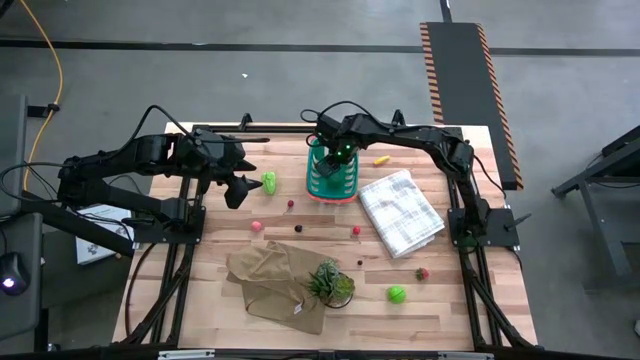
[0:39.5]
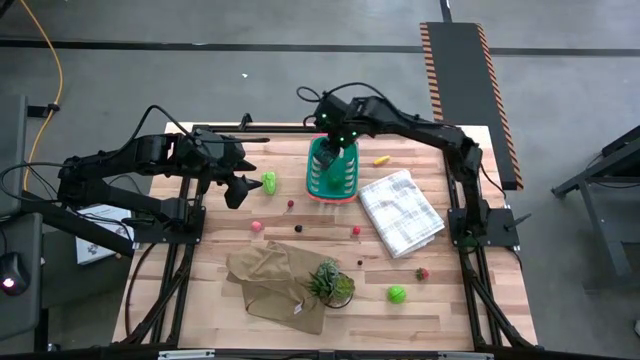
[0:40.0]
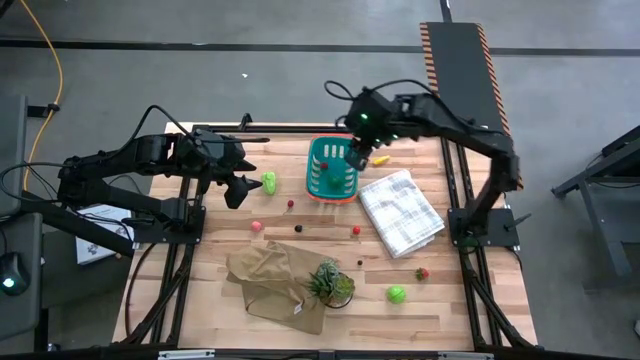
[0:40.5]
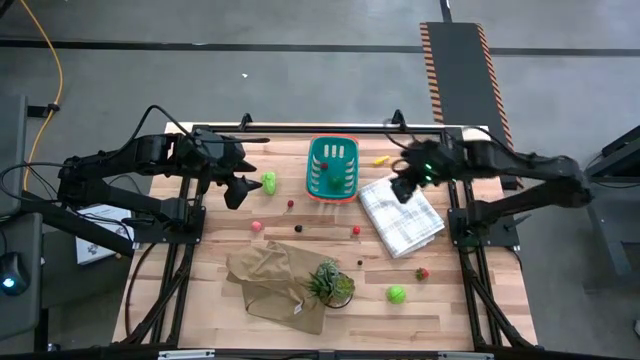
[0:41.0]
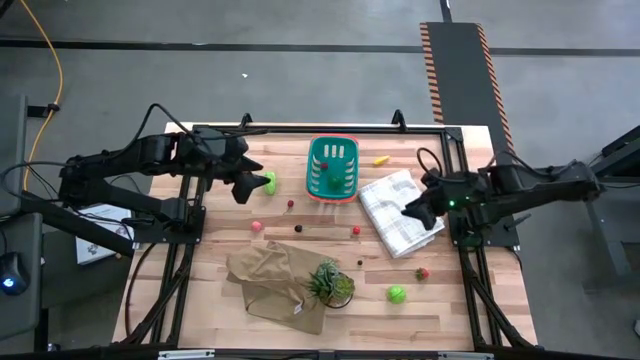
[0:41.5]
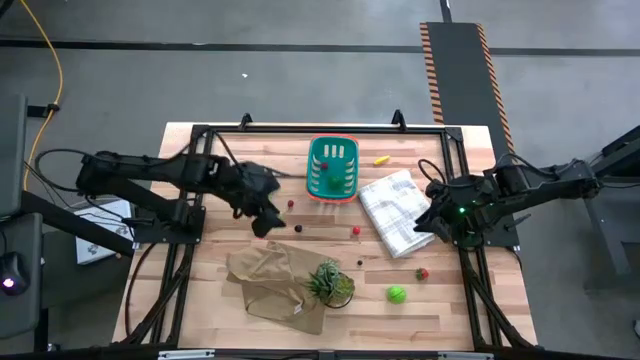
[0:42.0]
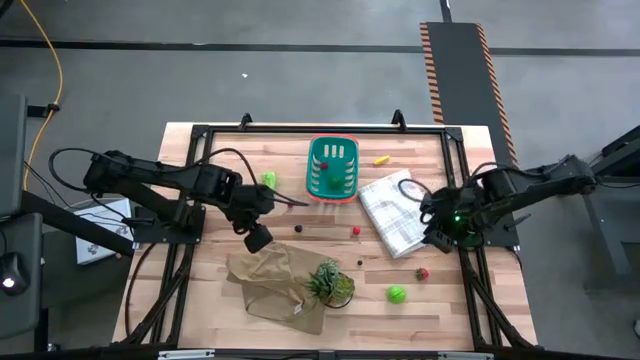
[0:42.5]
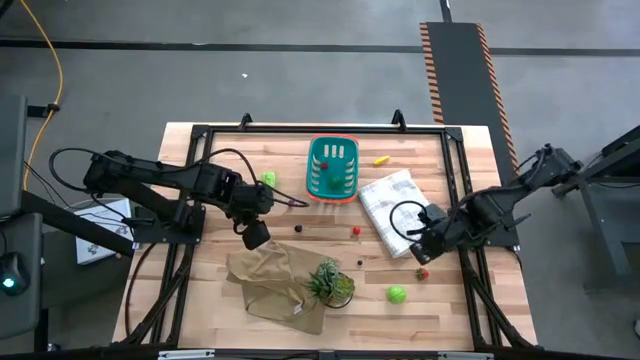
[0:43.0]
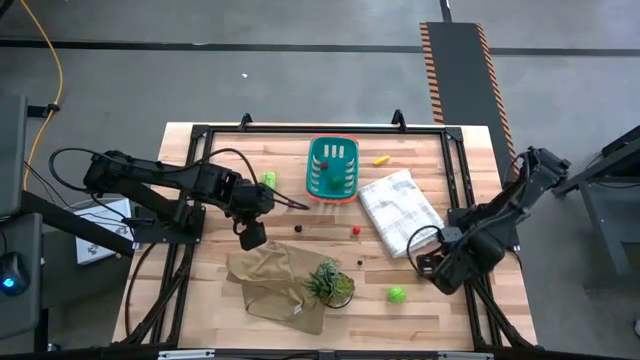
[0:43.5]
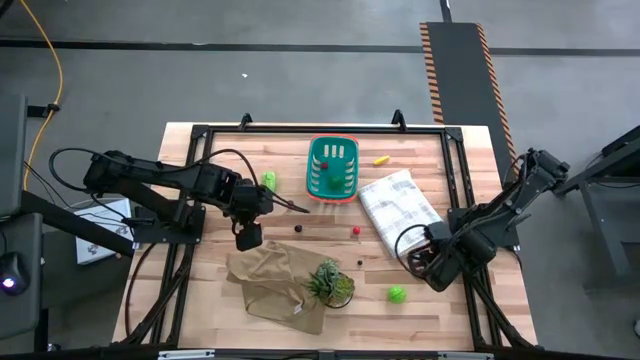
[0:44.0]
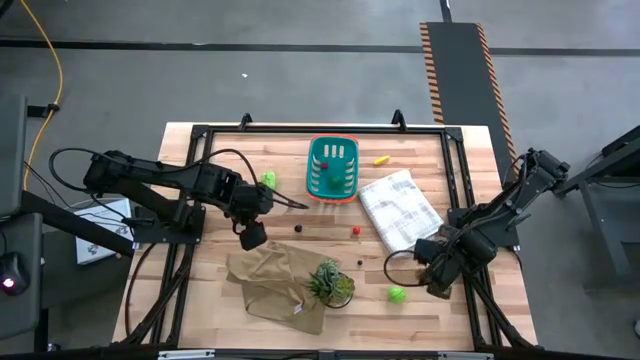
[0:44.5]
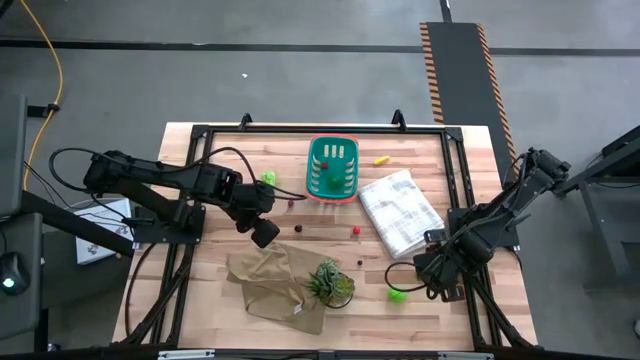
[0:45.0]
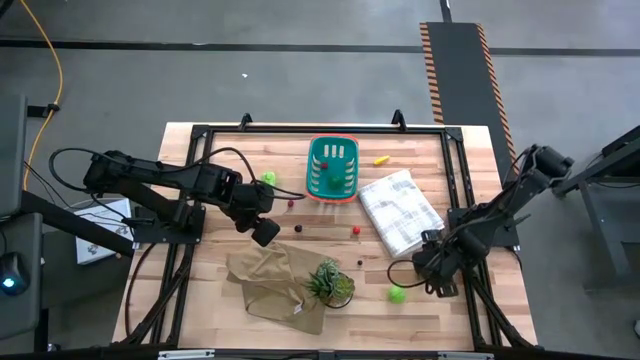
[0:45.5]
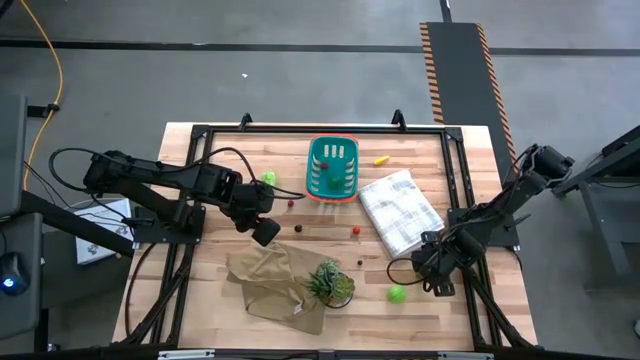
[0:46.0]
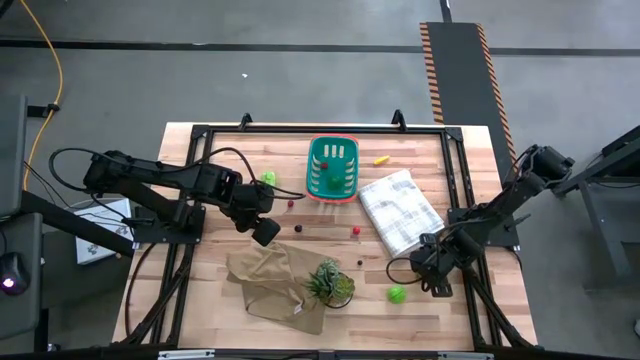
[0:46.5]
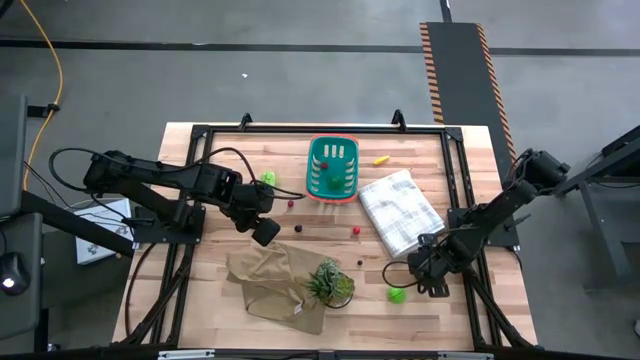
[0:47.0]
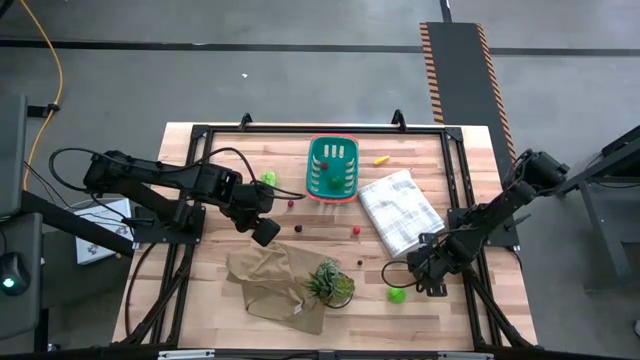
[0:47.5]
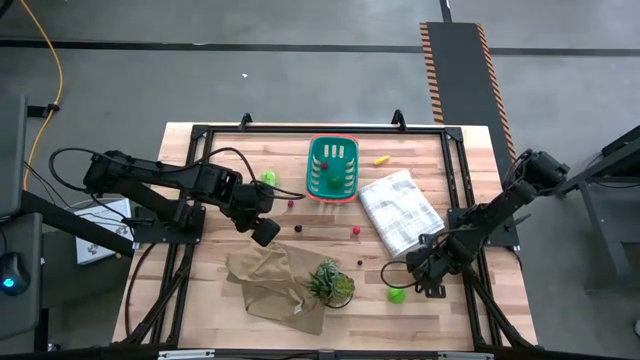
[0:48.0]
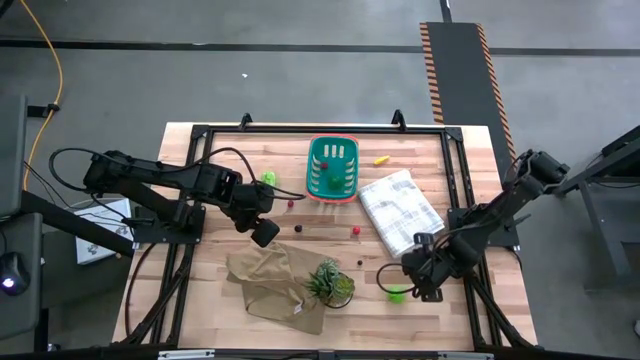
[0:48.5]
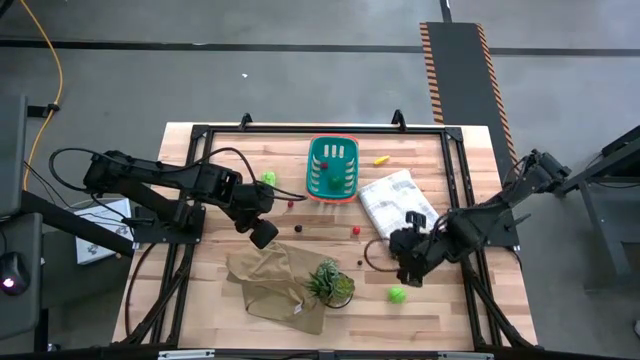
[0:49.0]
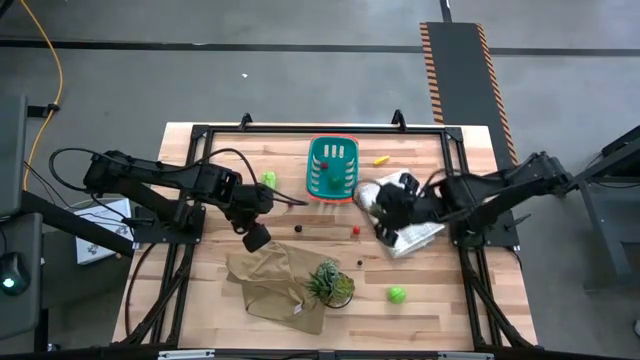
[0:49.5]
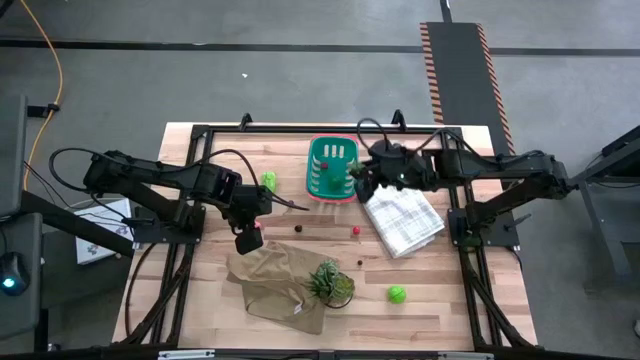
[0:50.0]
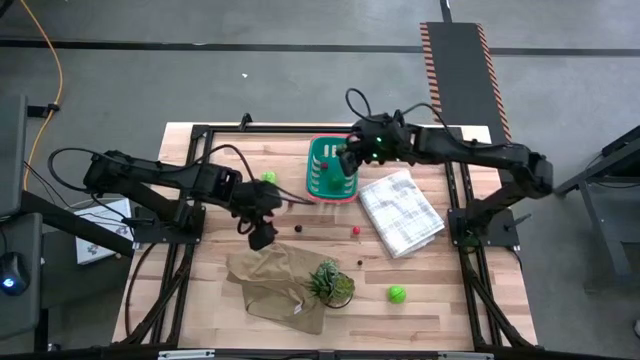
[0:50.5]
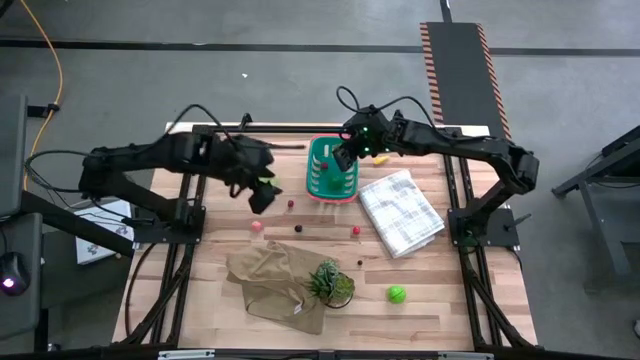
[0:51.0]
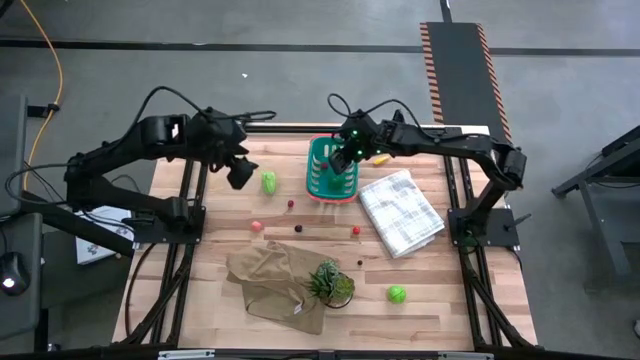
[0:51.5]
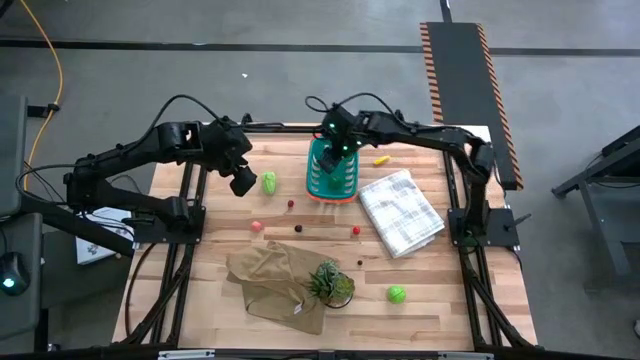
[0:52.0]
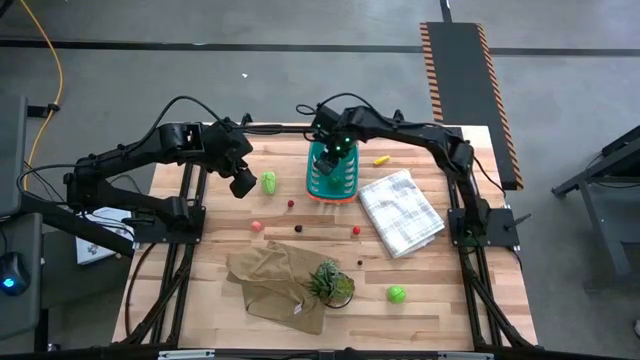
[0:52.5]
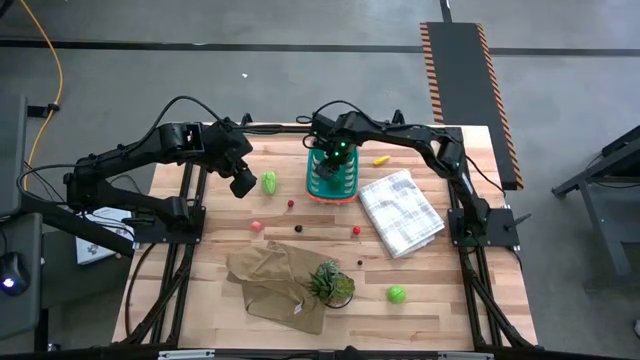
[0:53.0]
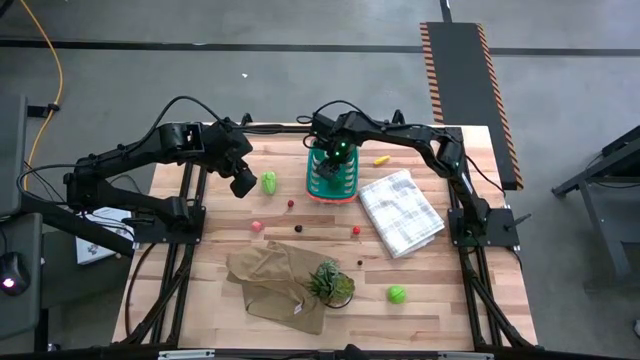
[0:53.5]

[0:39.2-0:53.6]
Task: Pick and placing Produce into tupperware
Put the red strawberry into the green basket

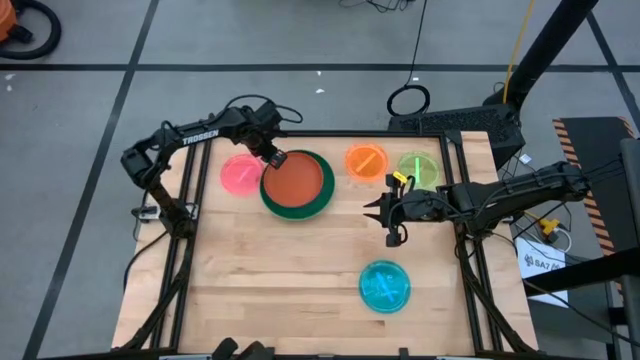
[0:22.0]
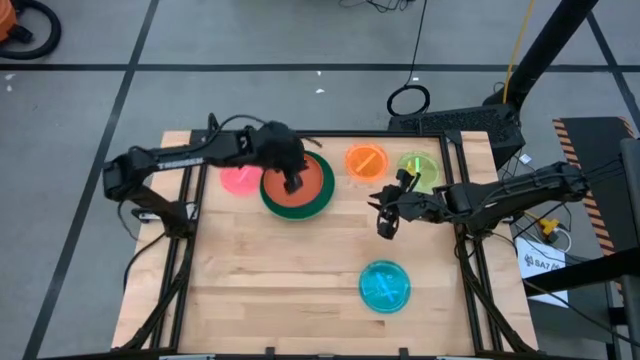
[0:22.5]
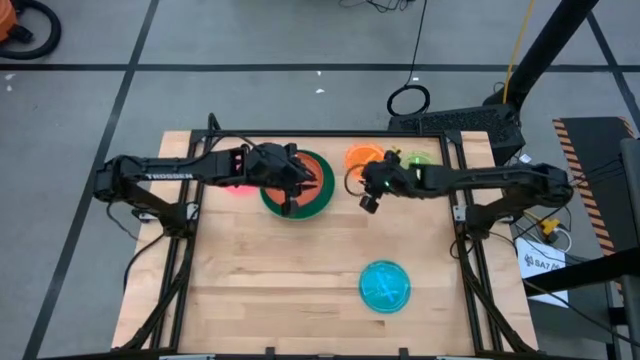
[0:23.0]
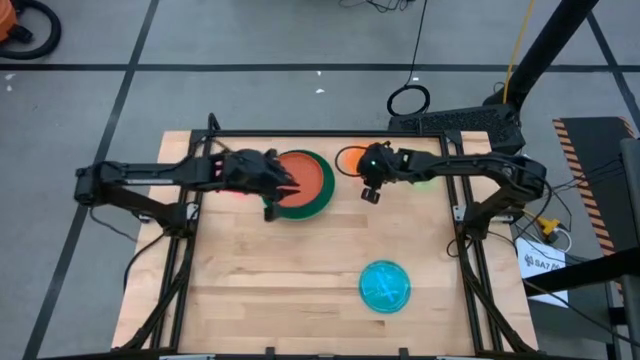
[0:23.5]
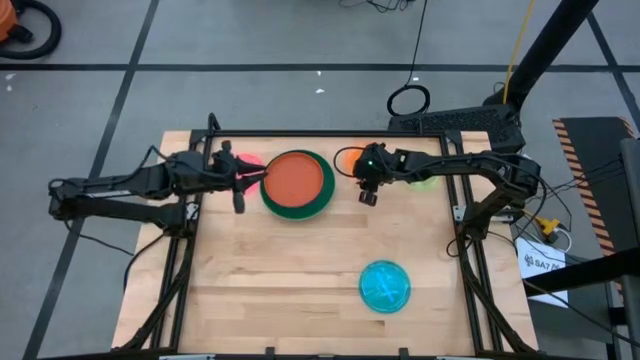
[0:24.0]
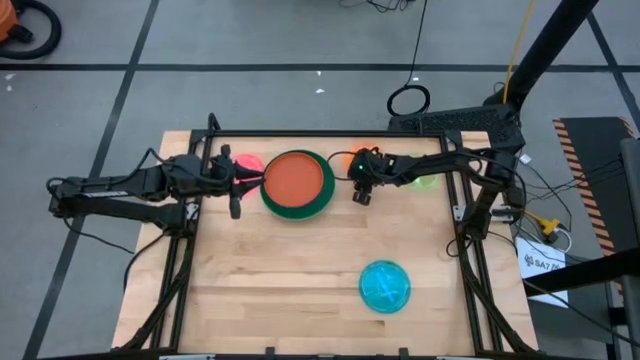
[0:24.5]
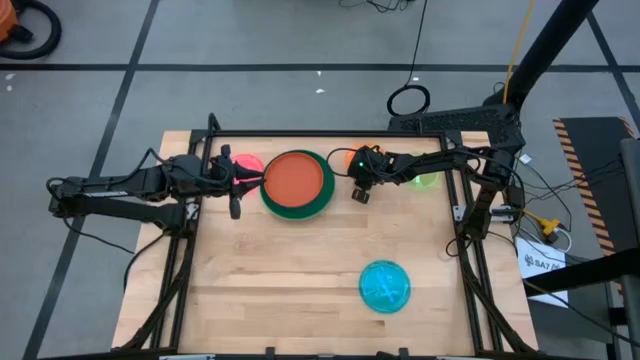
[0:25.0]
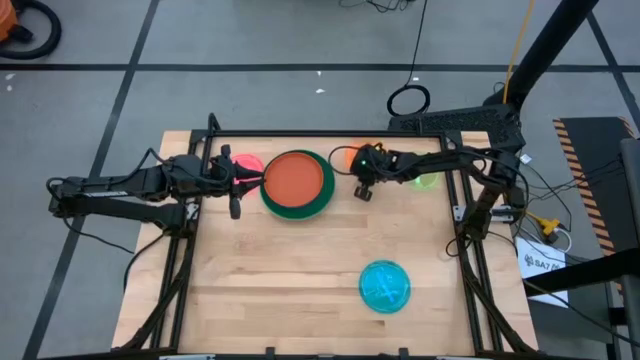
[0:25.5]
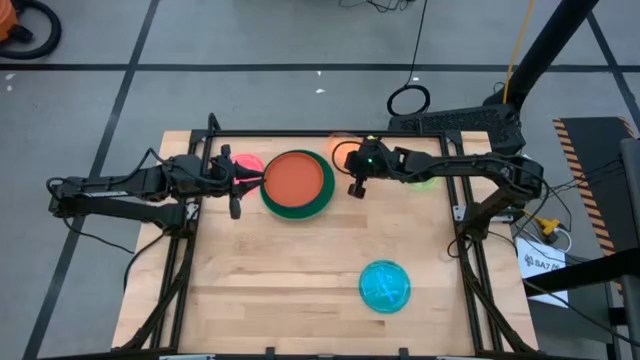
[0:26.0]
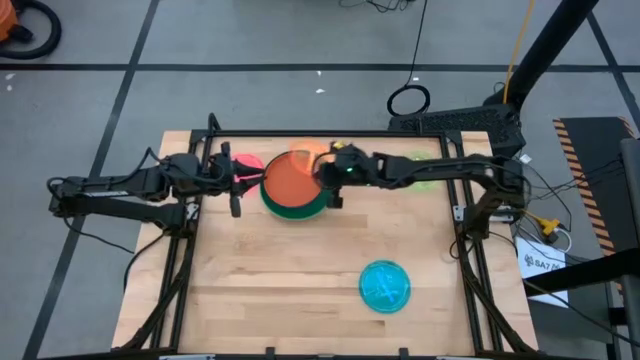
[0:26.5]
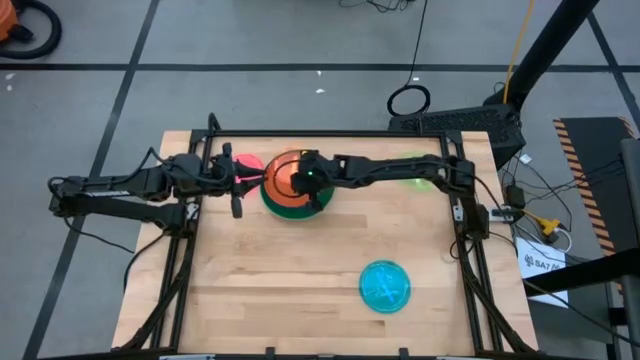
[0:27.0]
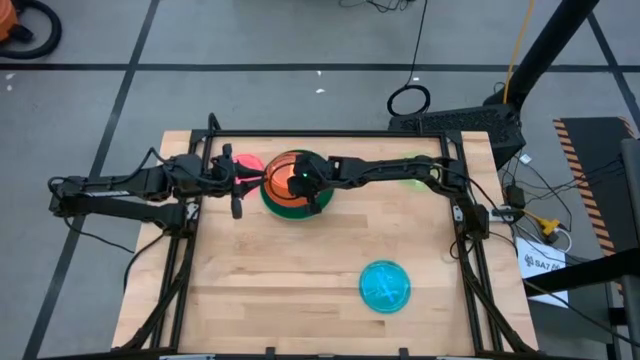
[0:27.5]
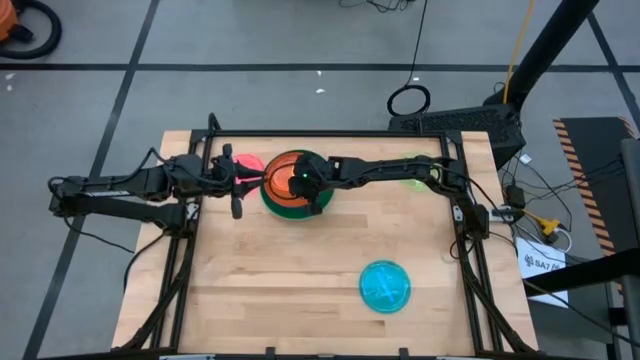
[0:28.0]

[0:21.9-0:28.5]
Task: Stack plastic plates
Stack the orange plate on top of the orange plate
